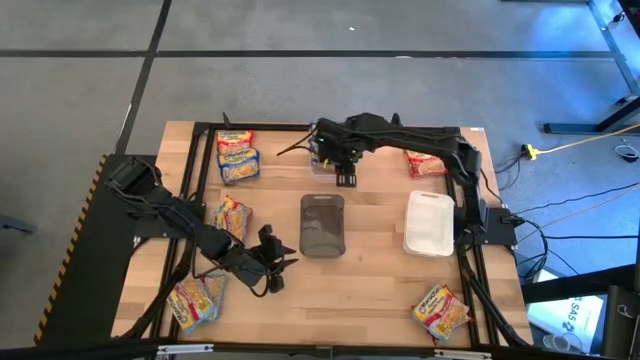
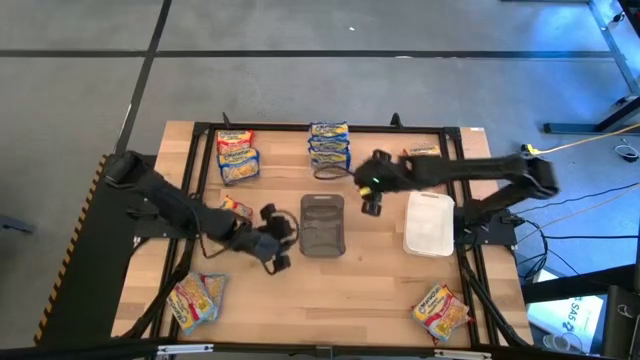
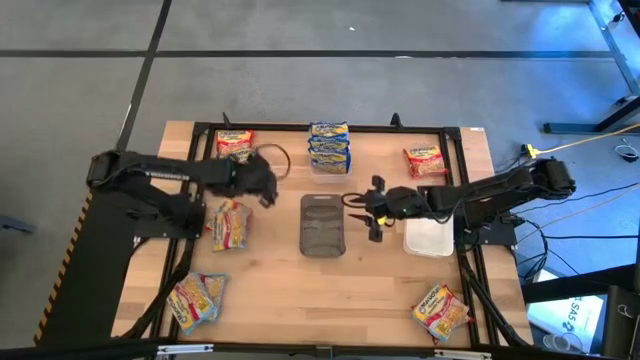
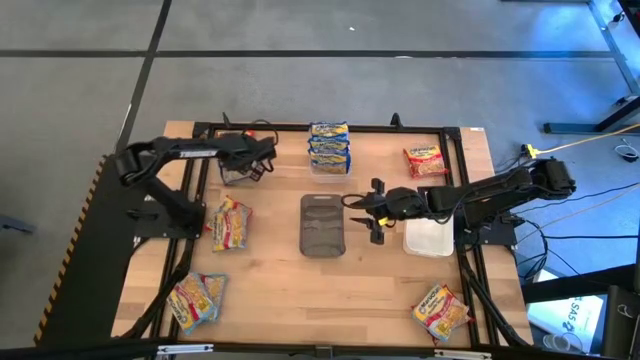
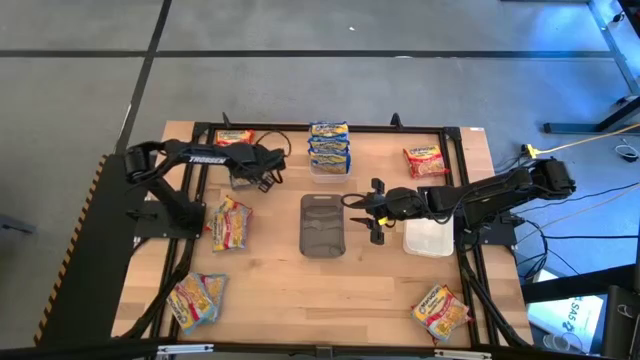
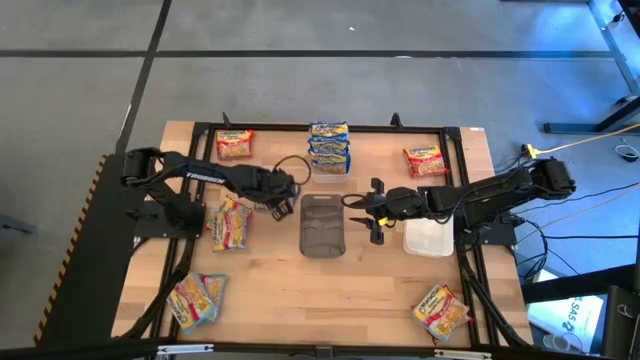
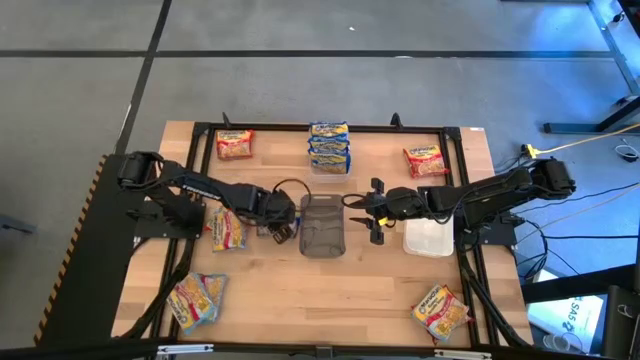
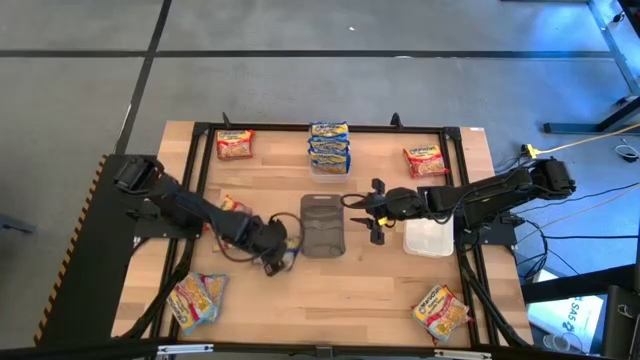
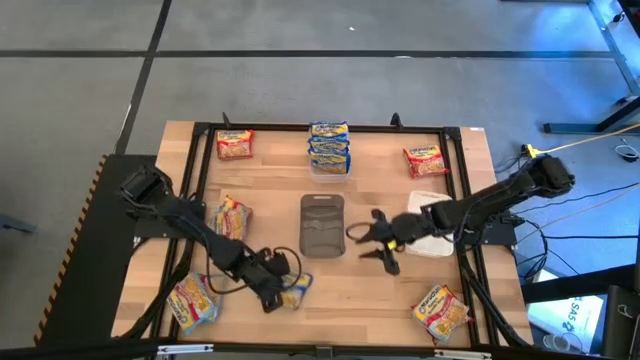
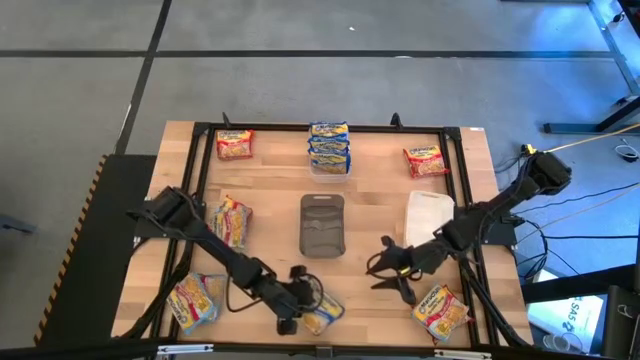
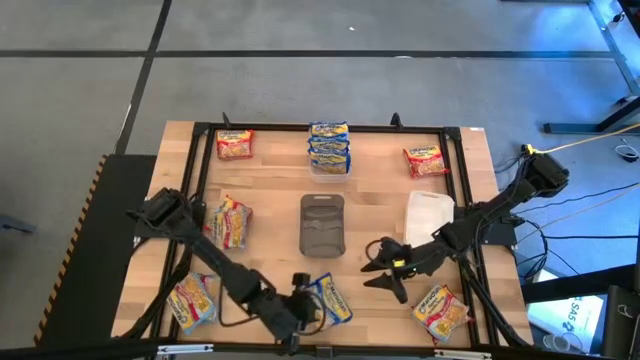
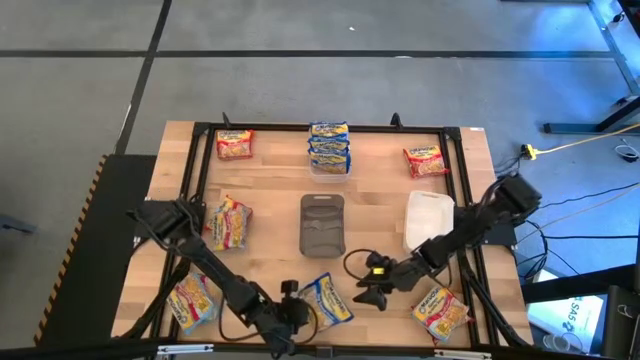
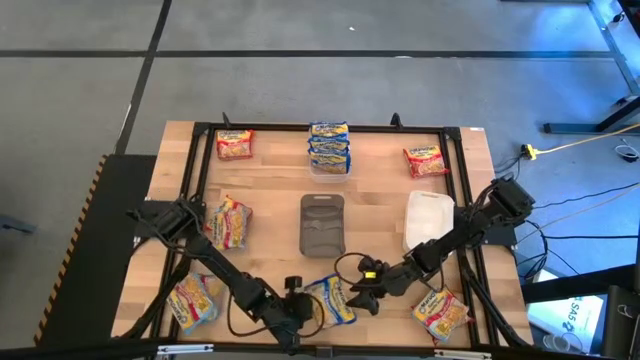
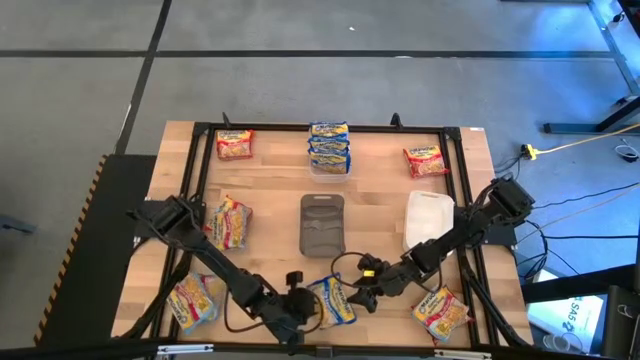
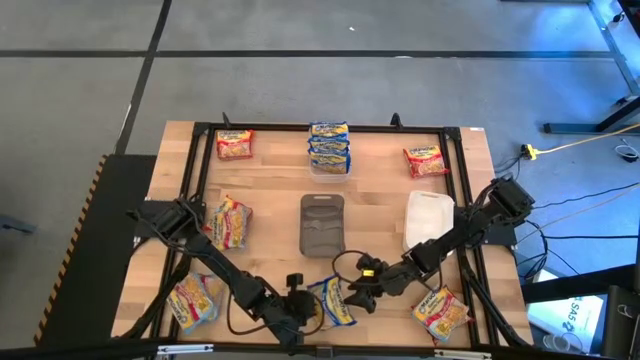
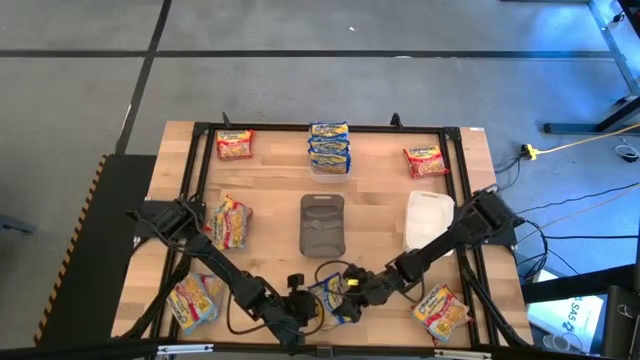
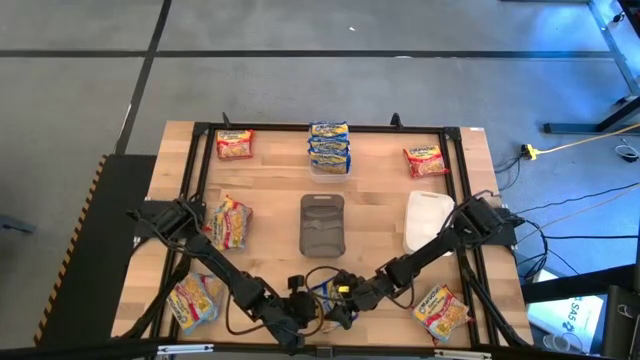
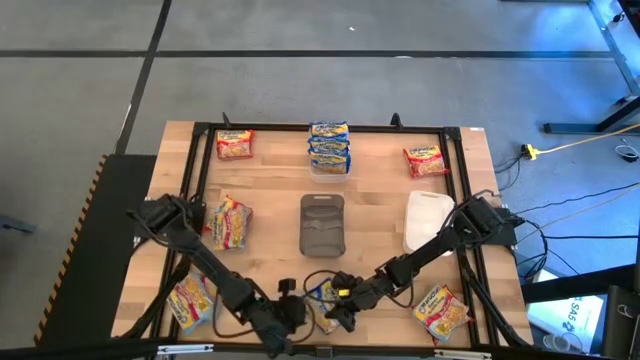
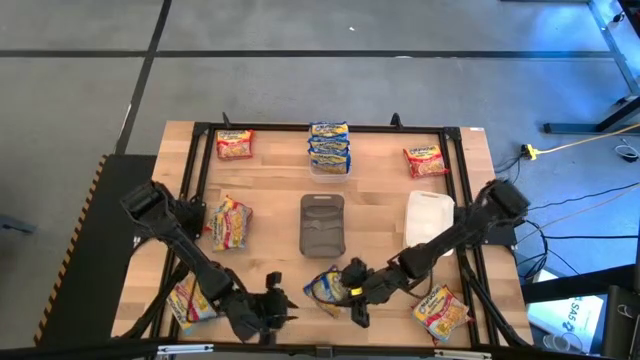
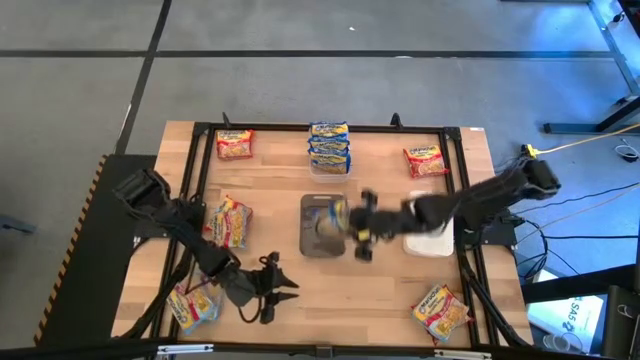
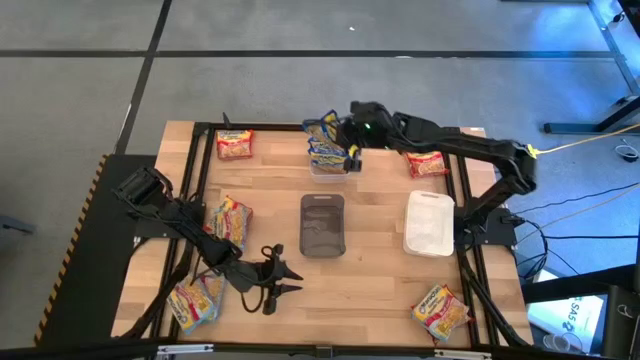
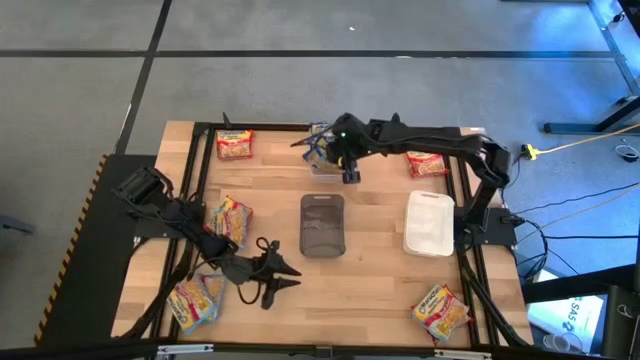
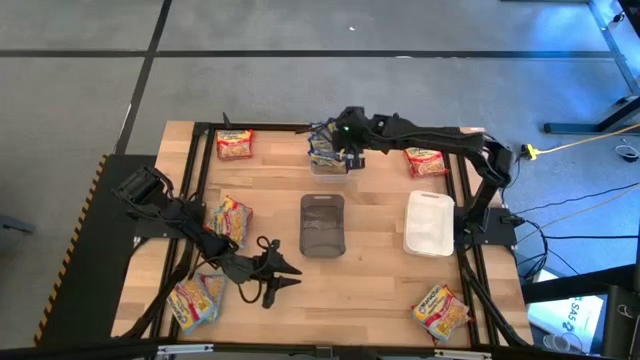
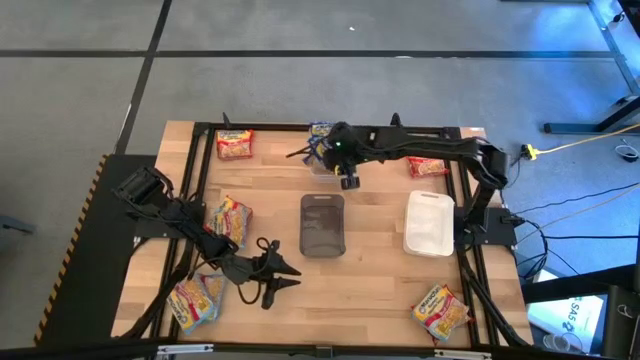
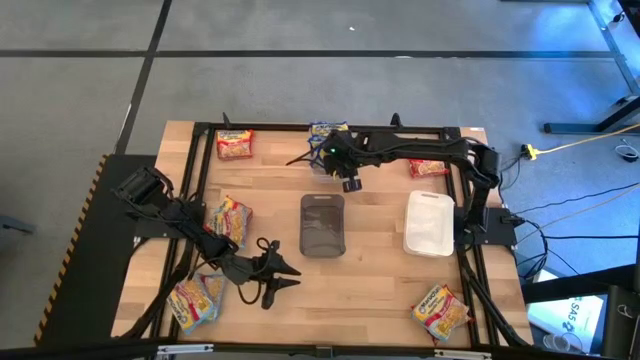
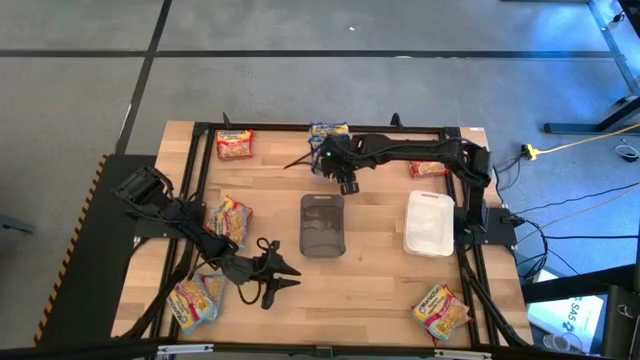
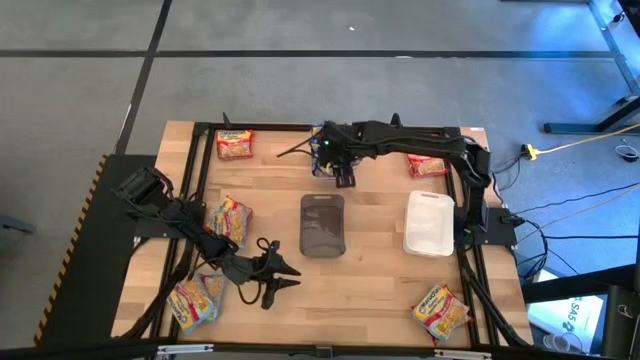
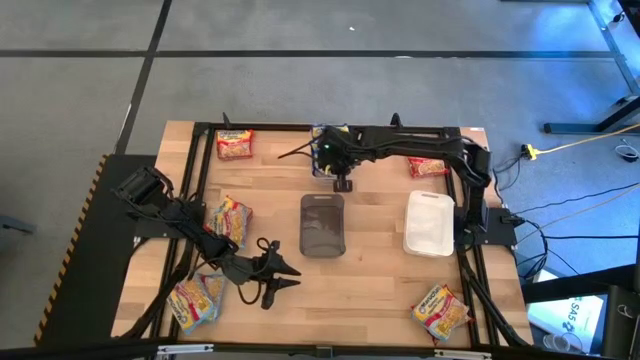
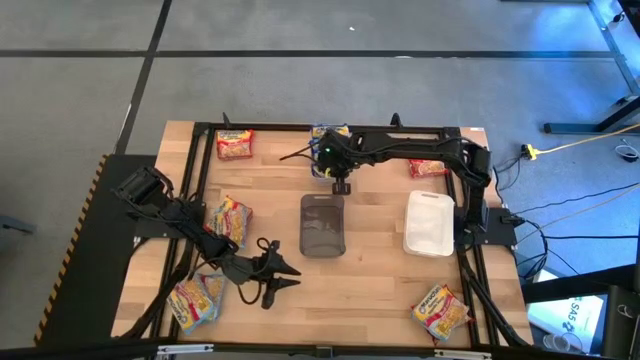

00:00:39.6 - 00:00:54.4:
Task: Sort Maruchan noodles
Put the blue noodle pack into the transparent bin

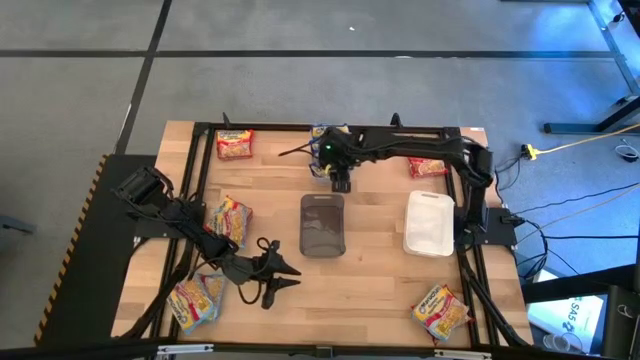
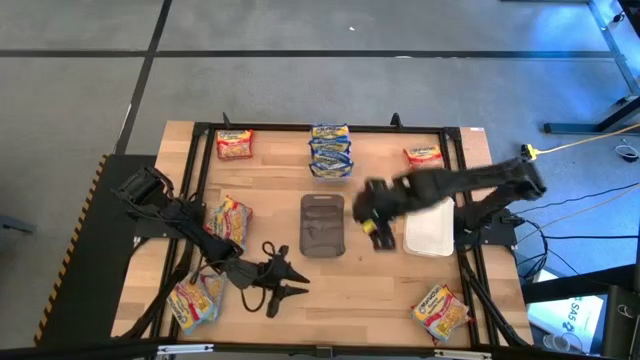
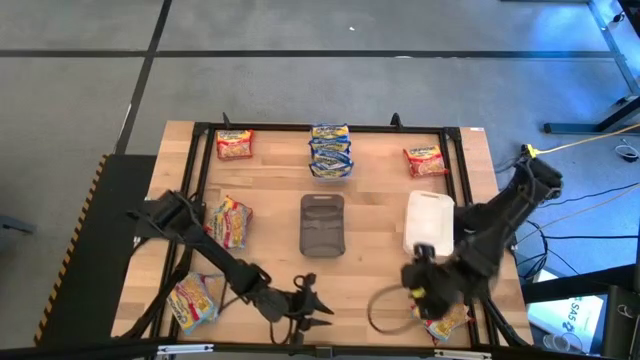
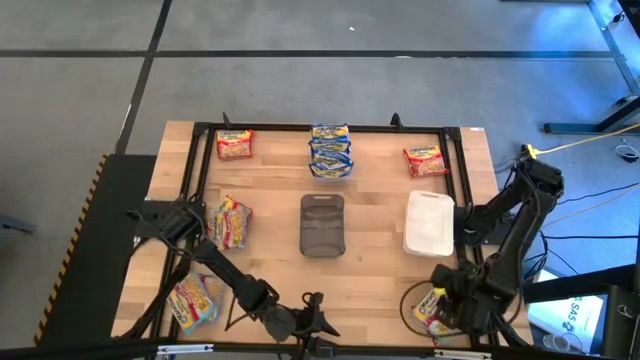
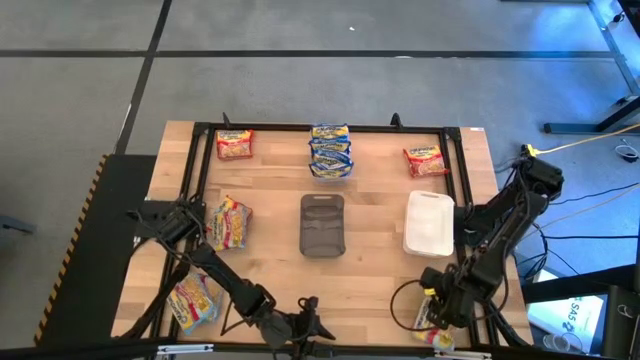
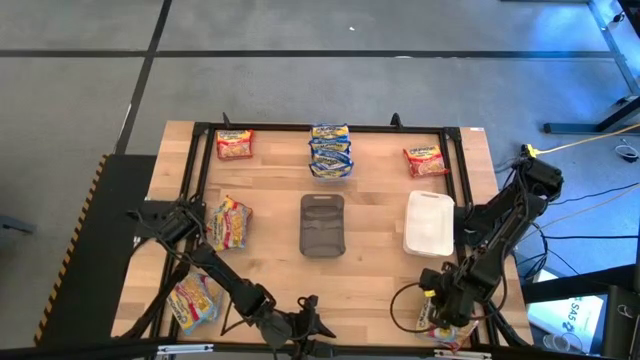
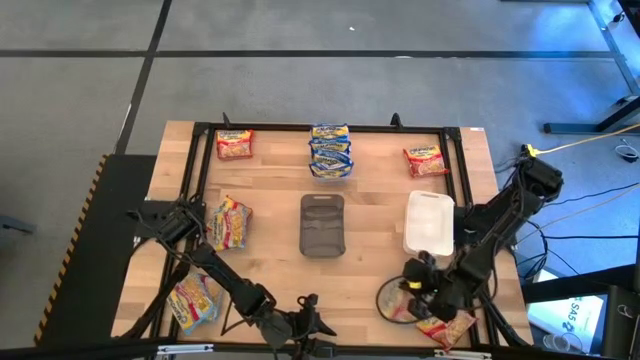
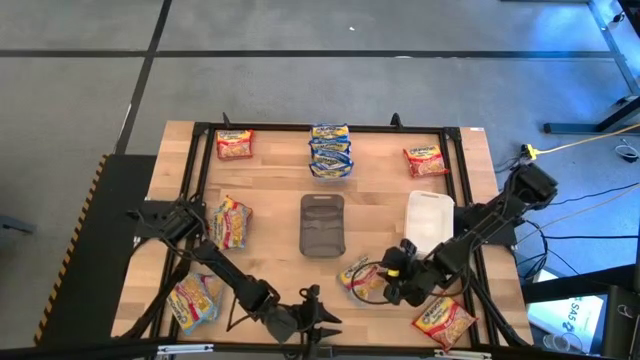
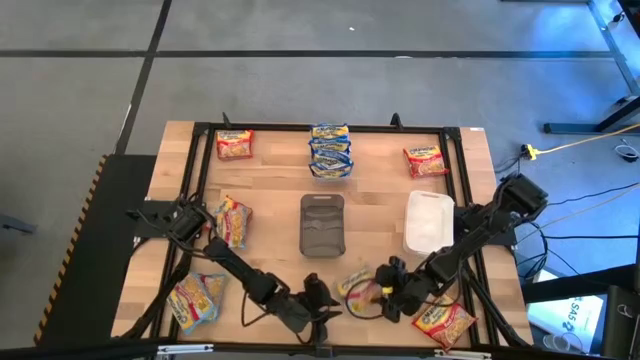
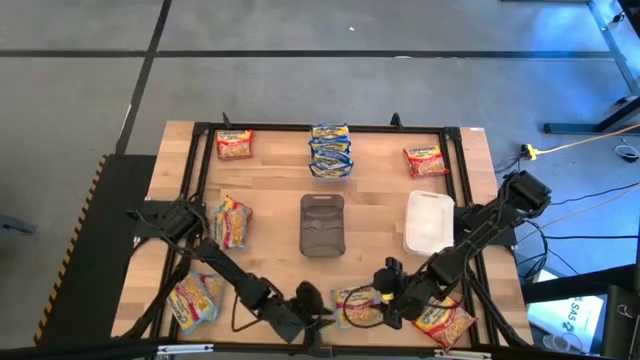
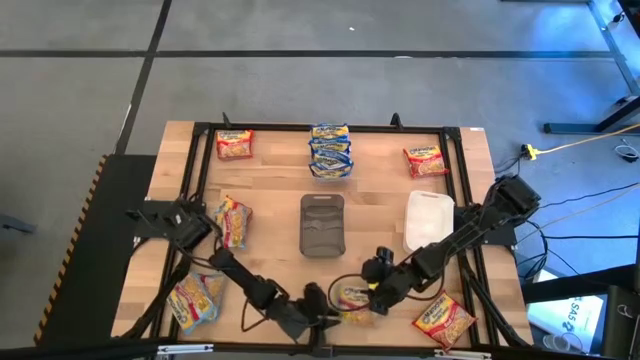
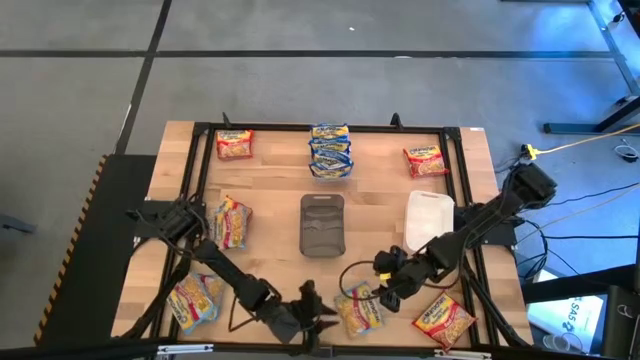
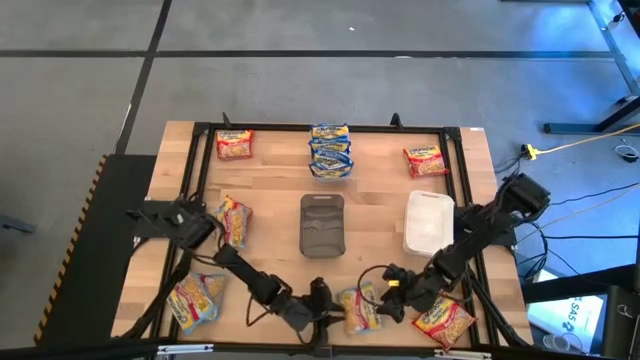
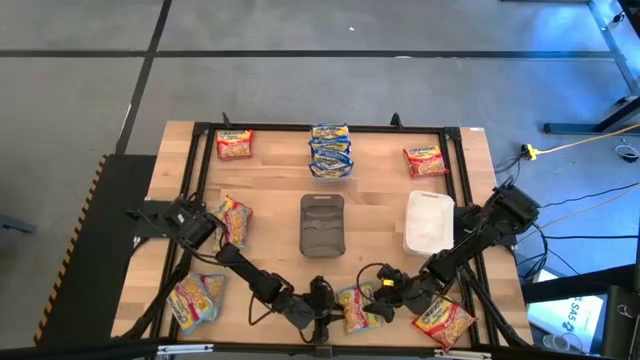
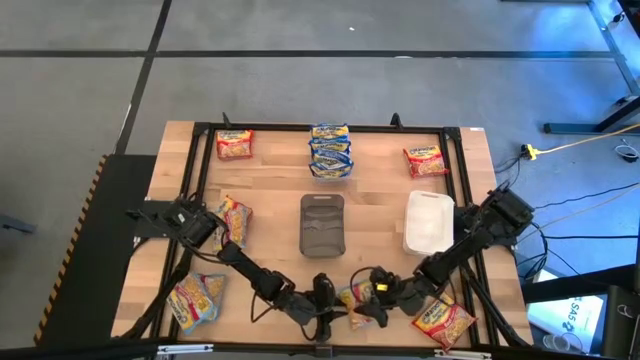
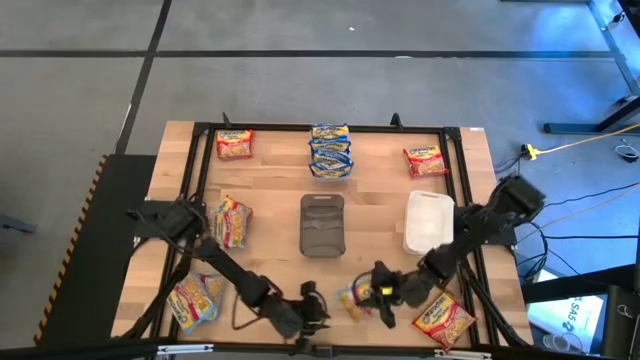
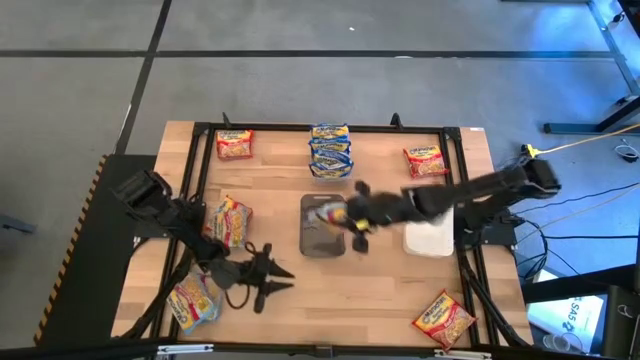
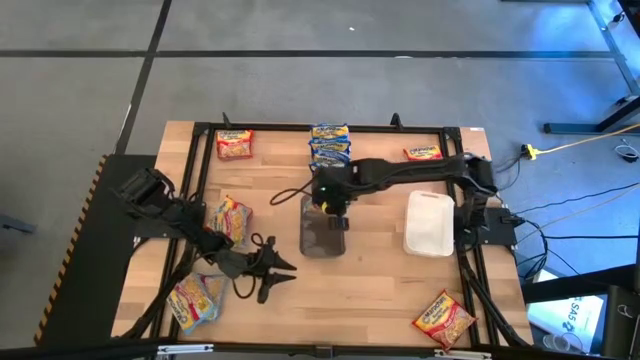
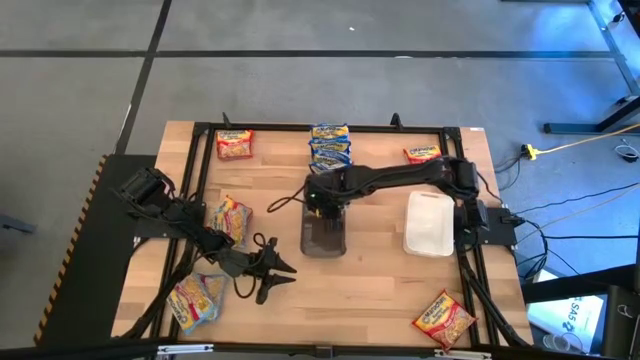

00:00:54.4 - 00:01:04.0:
Put the light blue noodle pack into the black bin
